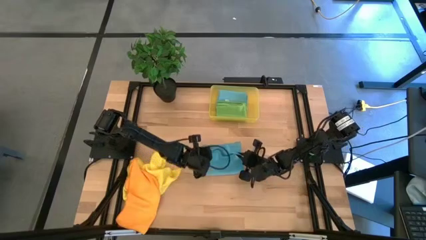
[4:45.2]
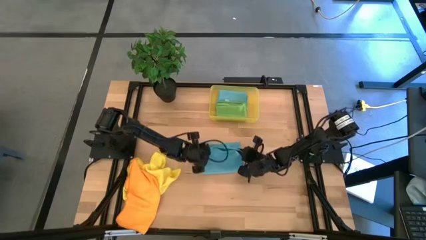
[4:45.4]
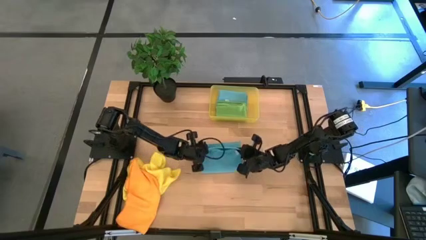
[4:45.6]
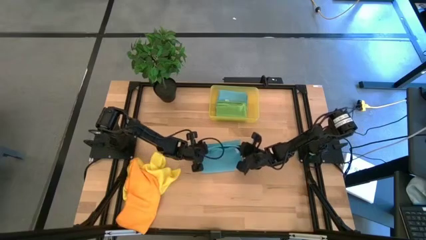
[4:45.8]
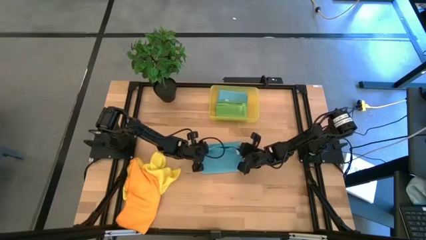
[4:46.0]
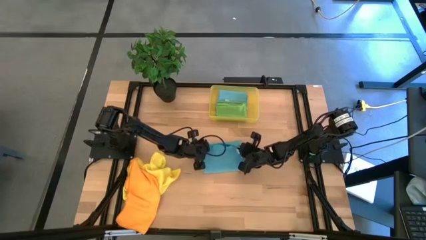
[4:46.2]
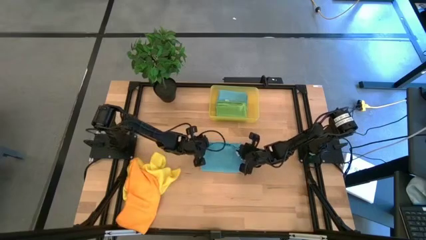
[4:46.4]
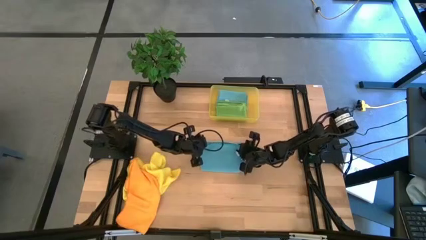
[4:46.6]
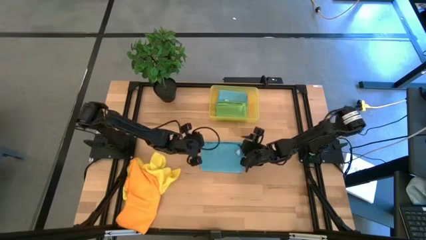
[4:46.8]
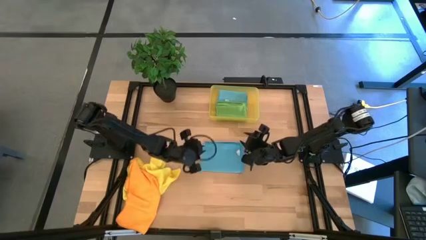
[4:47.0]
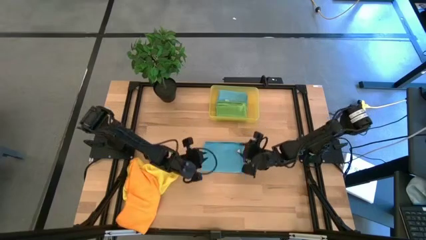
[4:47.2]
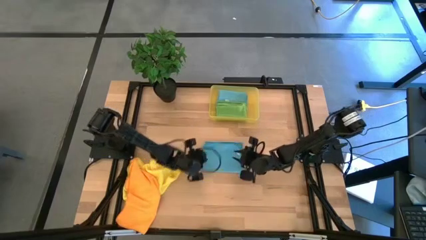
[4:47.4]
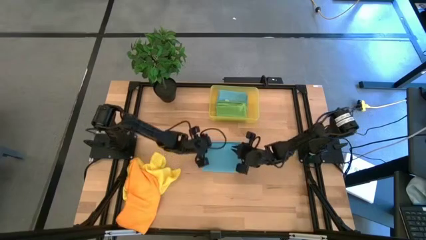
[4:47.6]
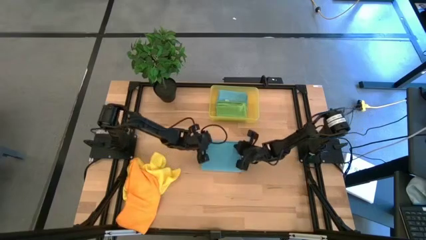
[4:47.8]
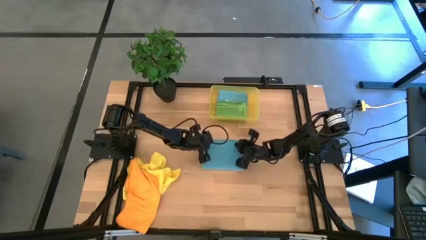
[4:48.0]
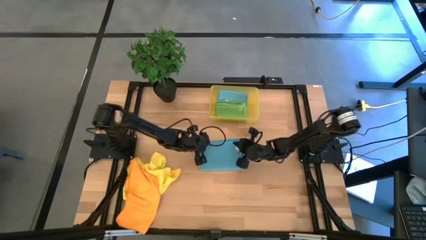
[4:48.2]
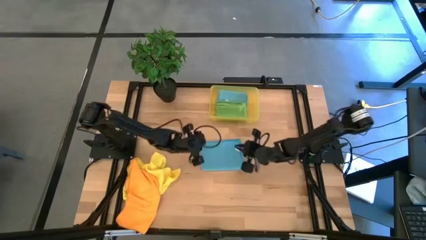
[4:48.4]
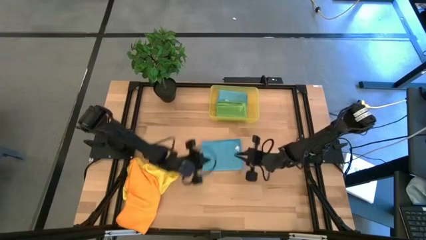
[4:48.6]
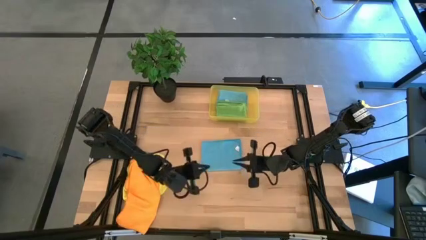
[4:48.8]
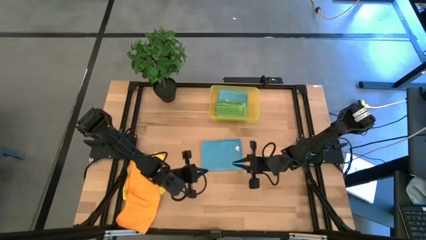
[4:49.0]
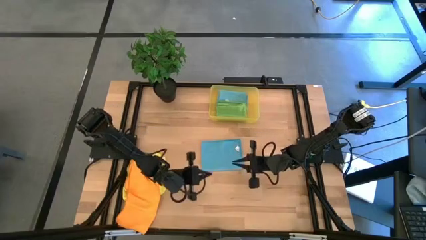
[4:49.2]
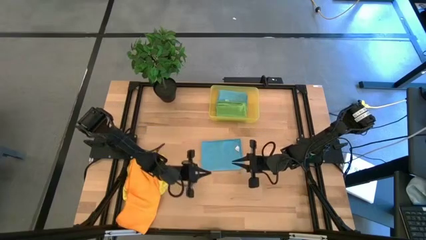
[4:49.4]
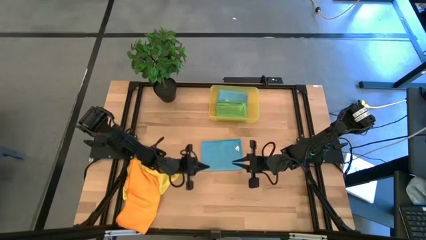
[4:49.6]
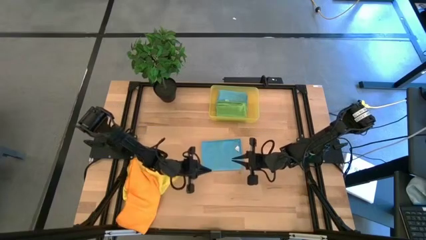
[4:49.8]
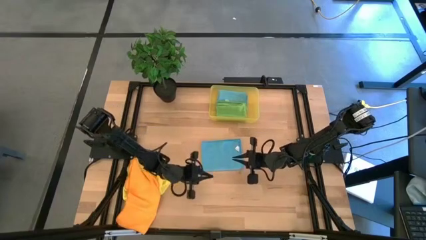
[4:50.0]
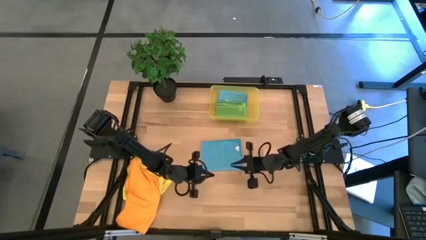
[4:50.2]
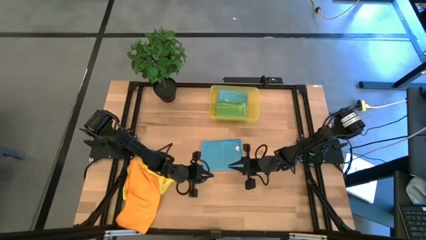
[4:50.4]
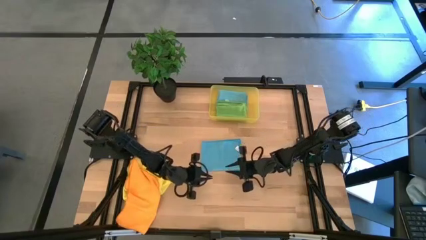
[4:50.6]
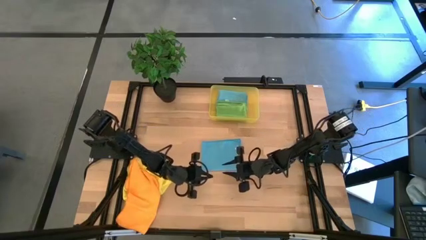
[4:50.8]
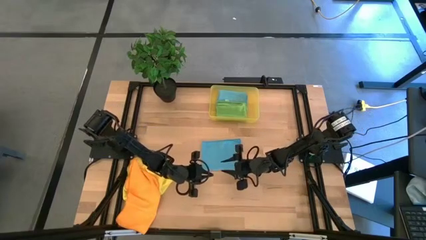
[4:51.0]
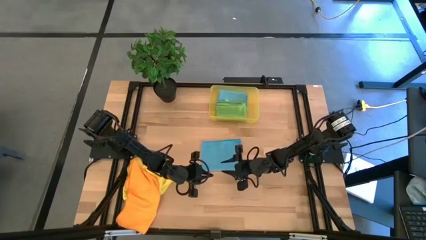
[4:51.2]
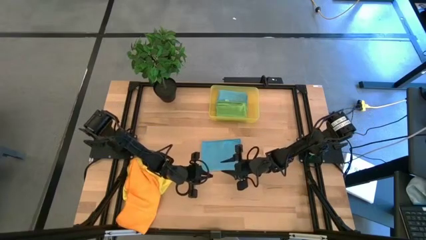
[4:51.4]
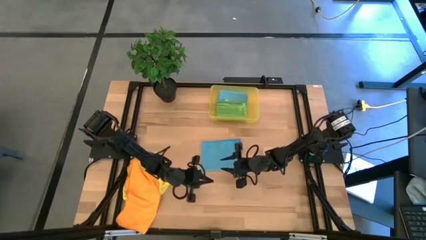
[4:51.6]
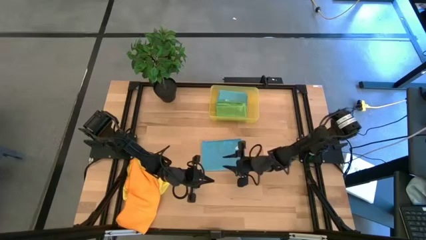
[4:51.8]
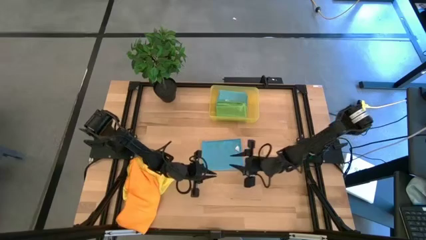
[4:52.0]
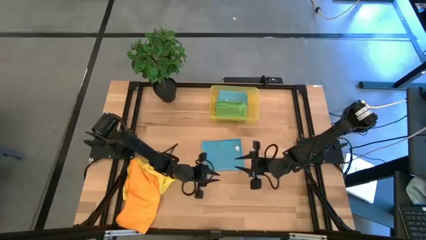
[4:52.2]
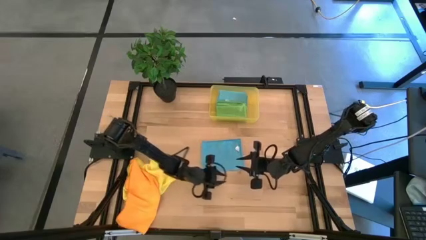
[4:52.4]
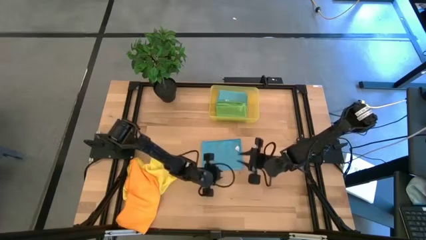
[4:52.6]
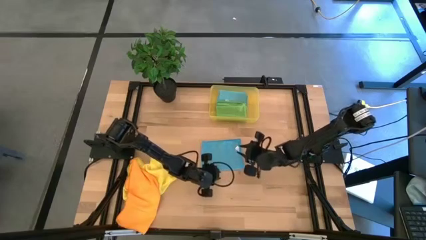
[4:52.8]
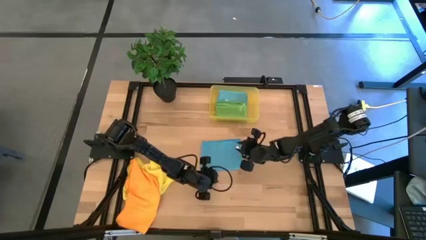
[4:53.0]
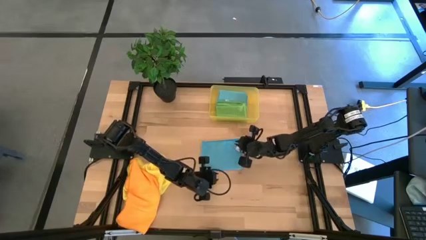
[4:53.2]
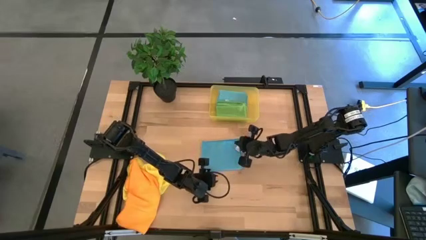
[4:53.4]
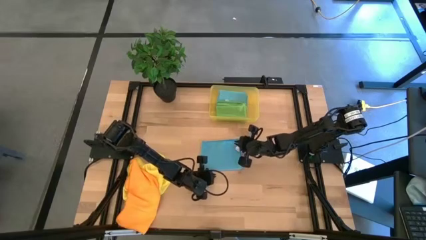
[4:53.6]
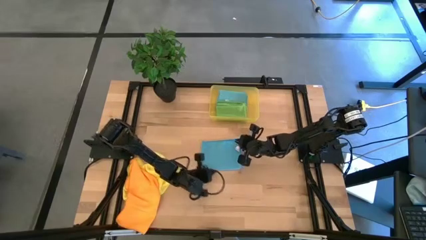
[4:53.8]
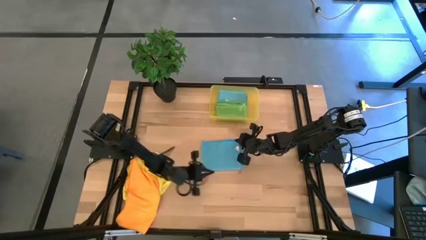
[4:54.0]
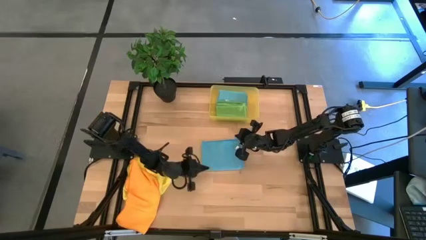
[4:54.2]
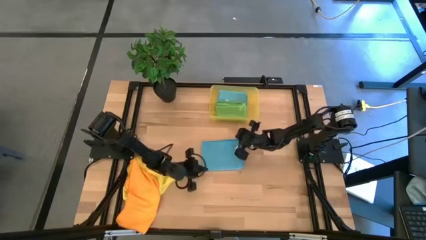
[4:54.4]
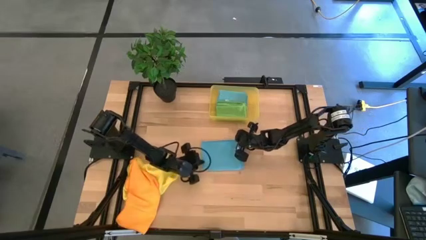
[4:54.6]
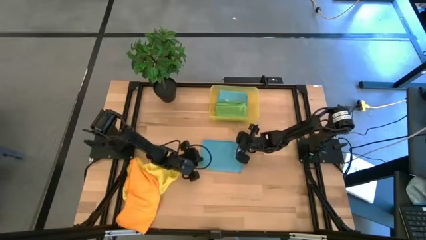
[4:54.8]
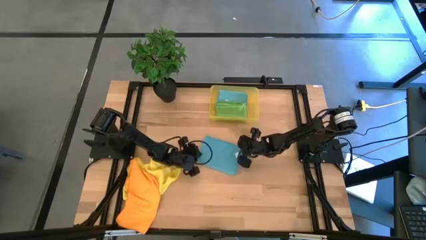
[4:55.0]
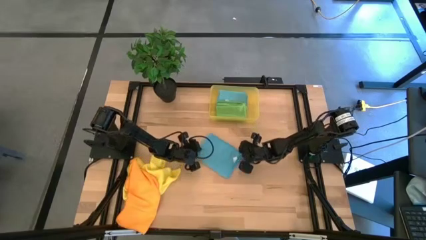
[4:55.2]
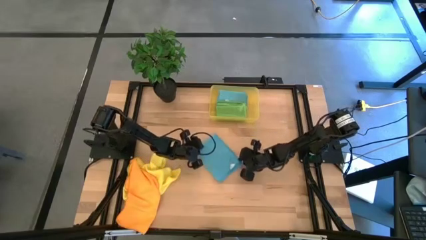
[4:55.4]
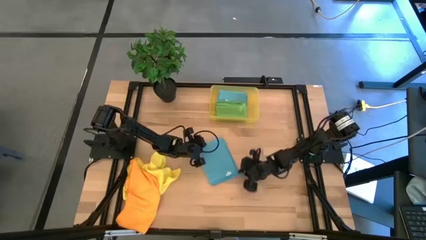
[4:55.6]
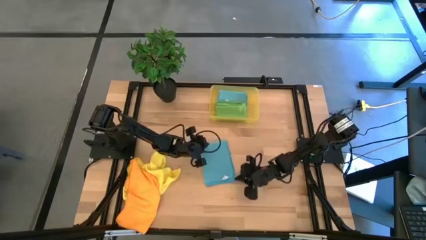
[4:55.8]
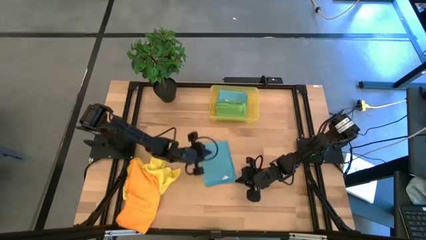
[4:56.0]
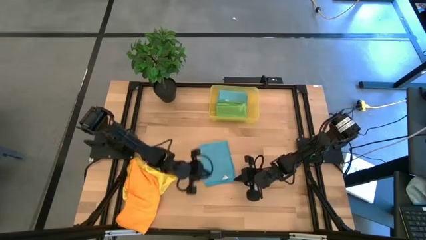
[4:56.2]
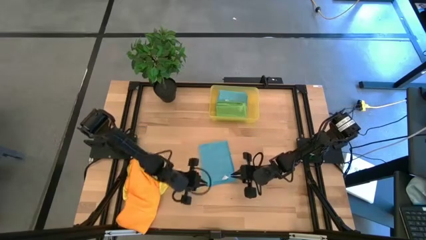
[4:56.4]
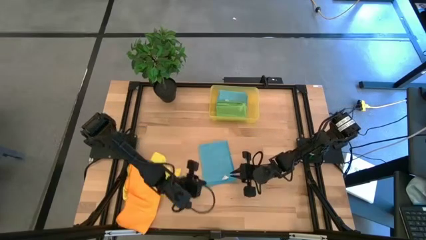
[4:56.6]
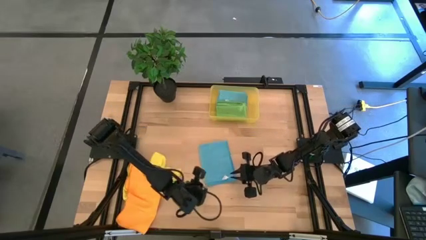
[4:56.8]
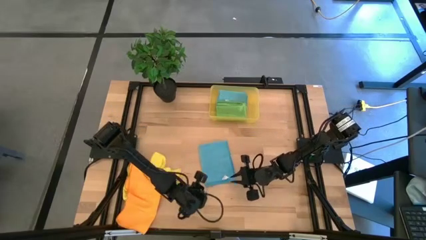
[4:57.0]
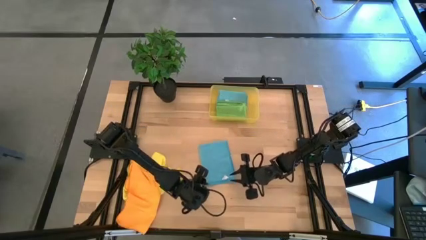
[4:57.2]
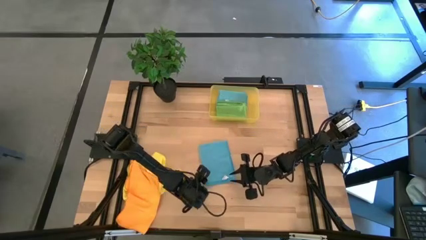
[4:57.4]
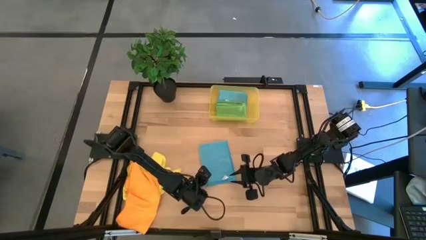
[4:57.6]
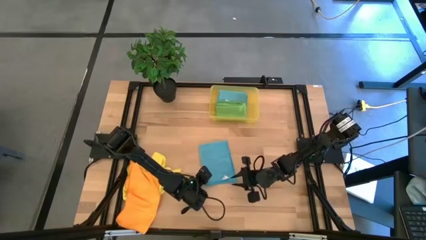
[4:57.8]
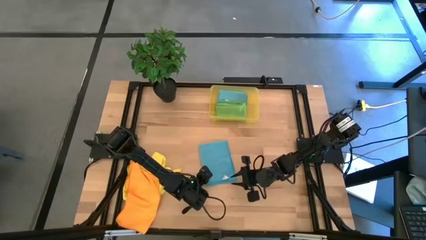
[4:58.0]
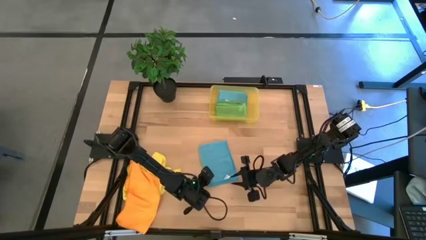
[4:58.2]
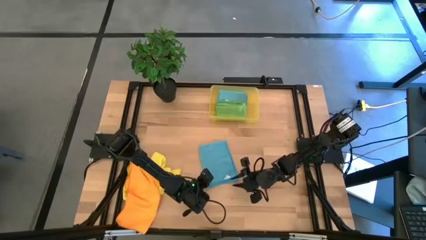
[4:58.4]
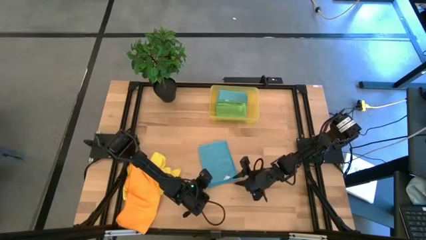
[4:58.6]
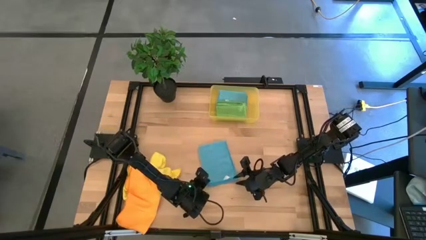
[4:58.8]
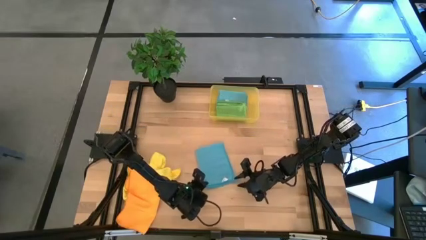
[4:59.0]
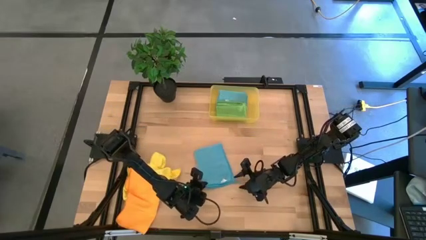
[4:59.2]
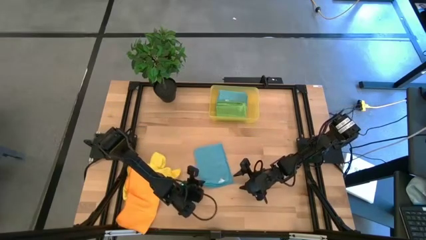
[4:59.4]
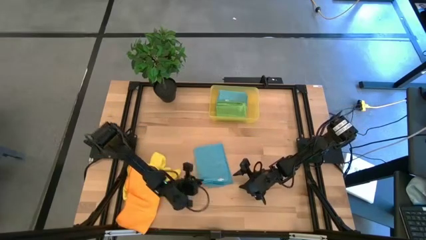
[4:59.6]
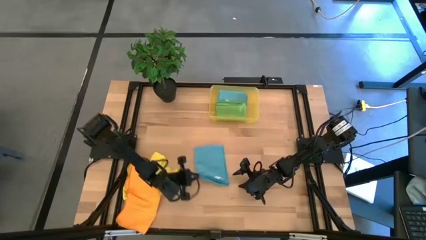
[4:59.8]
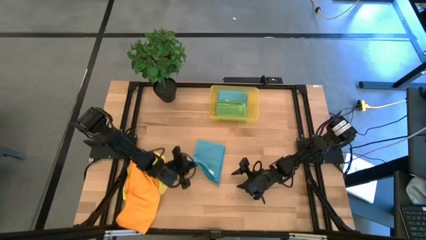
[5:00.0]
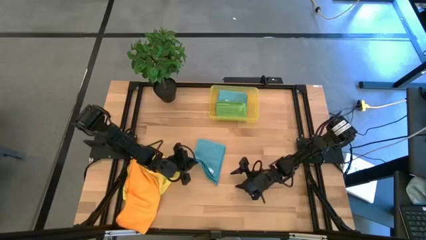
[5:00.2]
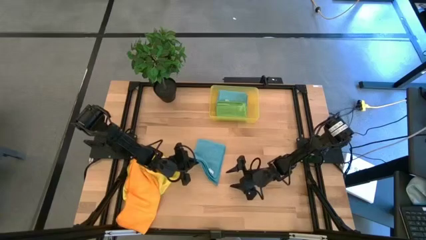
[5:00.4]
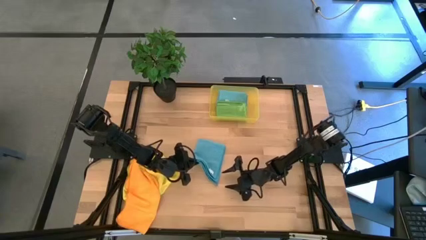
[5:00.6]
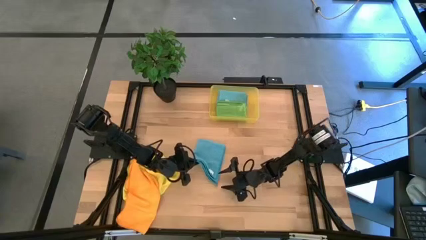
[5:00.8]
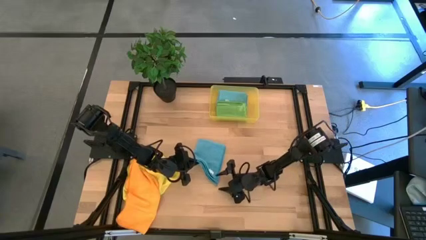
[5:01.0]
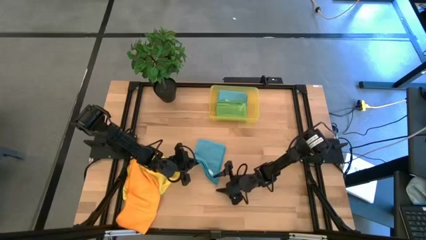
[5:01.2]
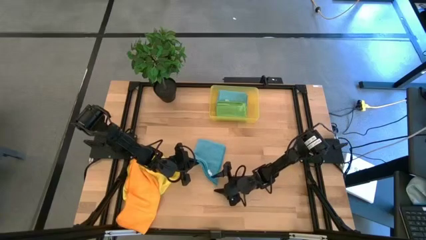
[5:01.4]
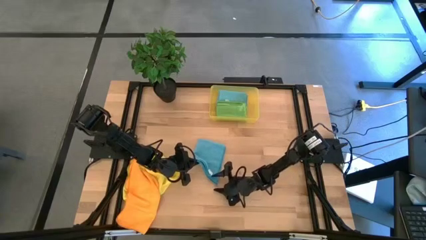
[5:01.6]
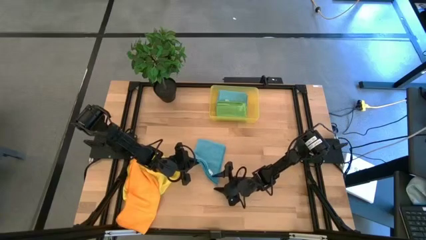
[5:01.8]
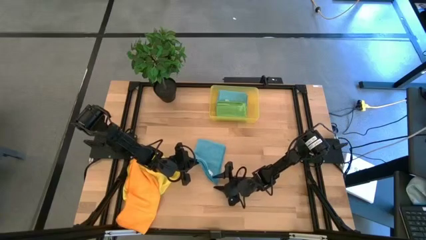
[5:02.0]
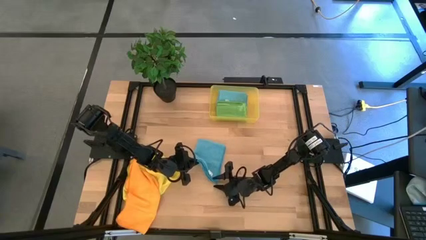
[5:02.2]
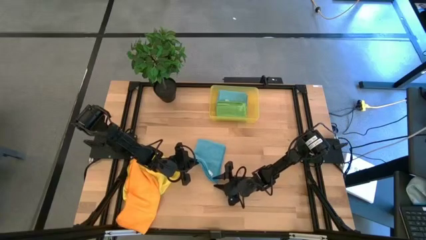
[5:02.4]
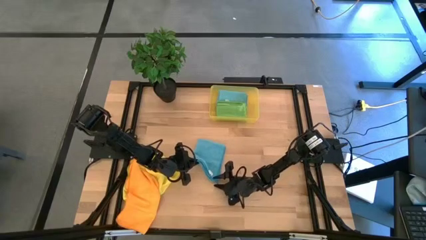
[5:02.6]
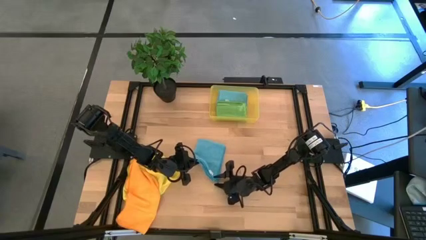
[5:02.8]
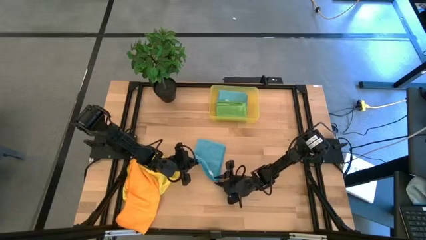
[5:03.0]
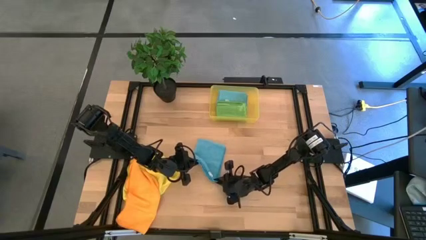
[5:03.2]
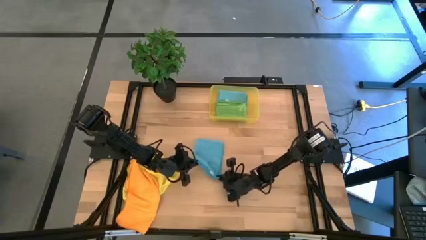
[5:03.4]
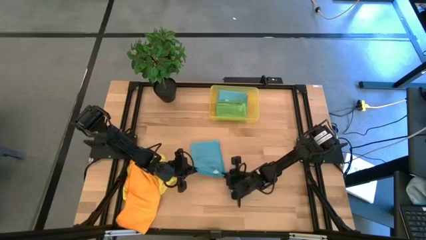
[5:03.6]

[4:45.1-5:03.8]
Task: Fold microfiber towels
Fold the blue microfiber towel
